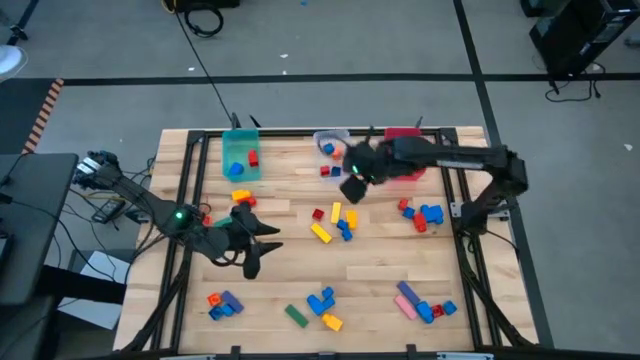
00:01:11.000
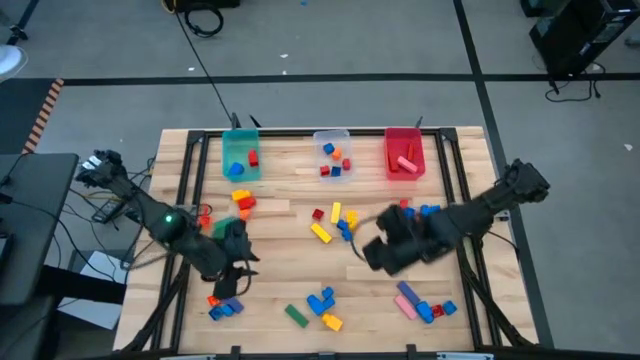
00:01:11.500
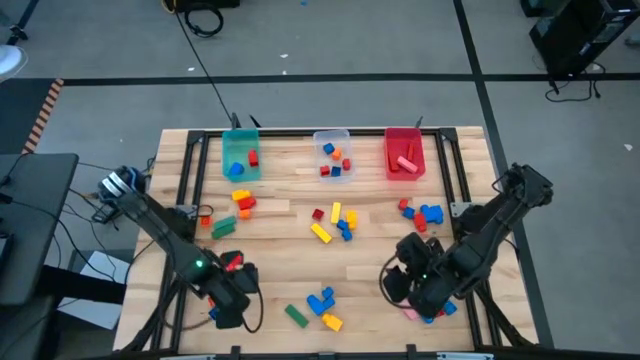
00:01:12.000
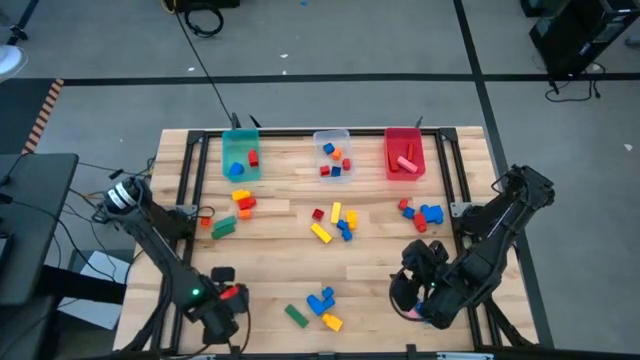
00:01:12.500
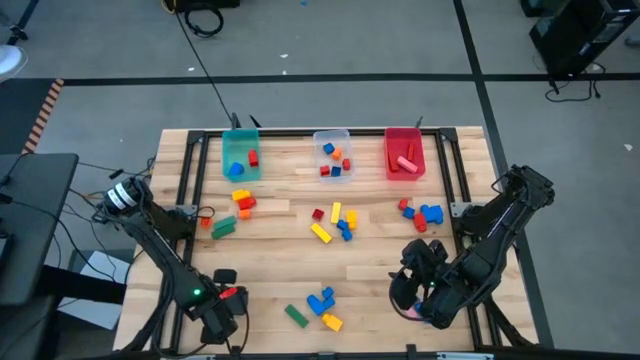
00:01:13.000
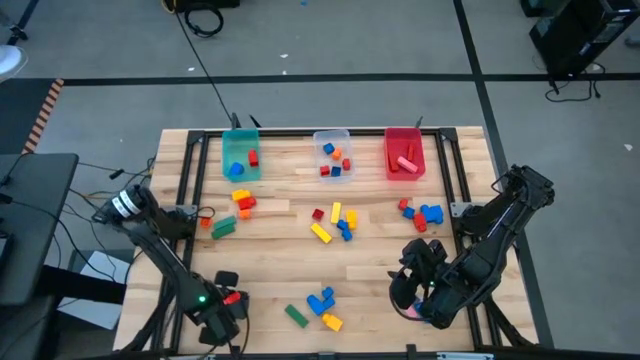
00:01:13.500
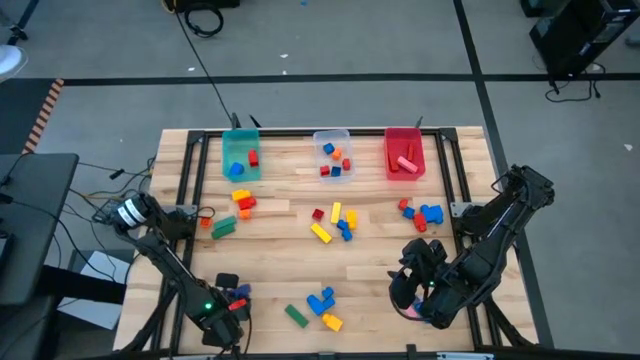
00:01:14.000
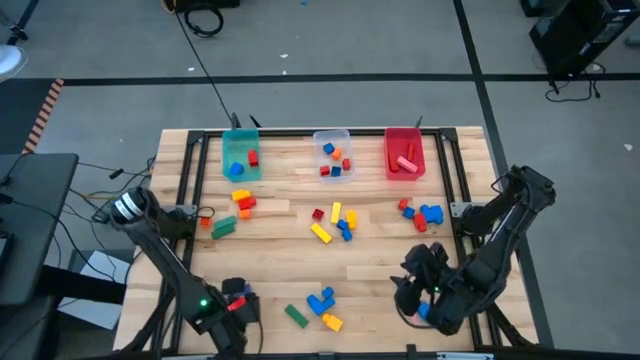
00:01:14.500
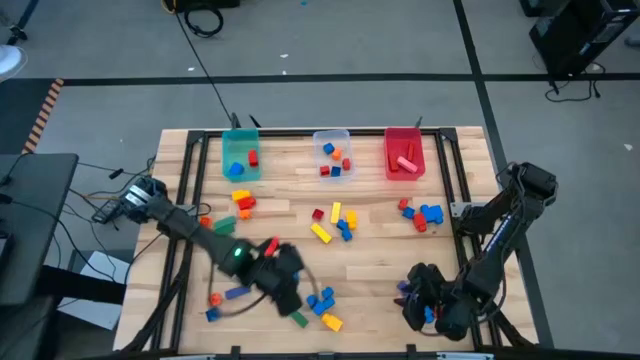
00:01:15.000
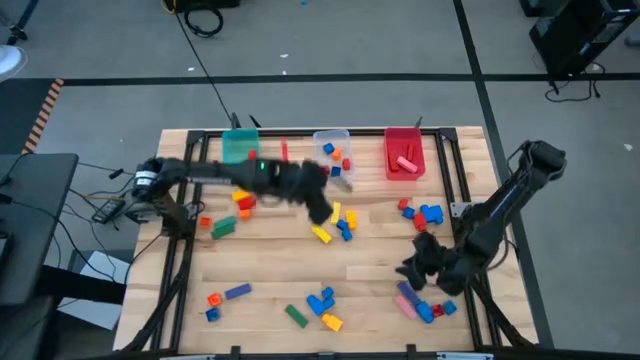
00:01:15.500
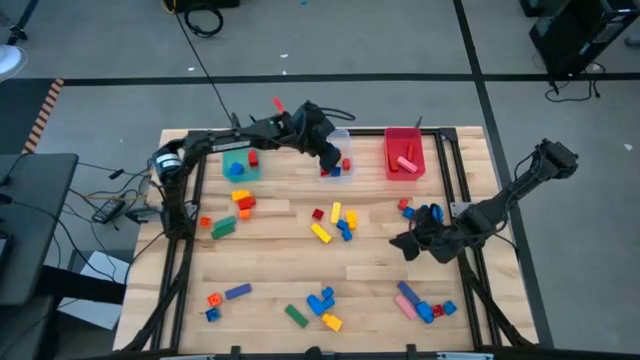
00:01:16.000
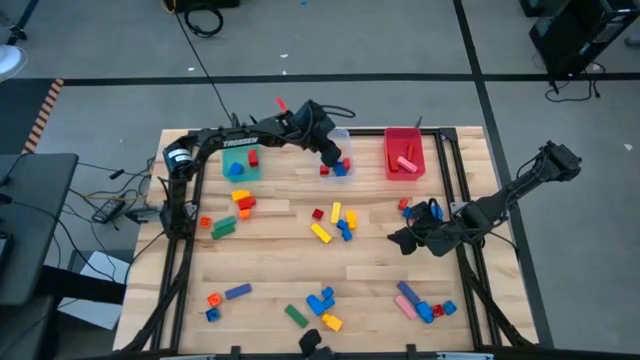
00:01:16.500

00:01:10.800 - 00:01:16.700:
Task: Sort blocks by size
Put the blue 4 stud game piece into the transparent bin

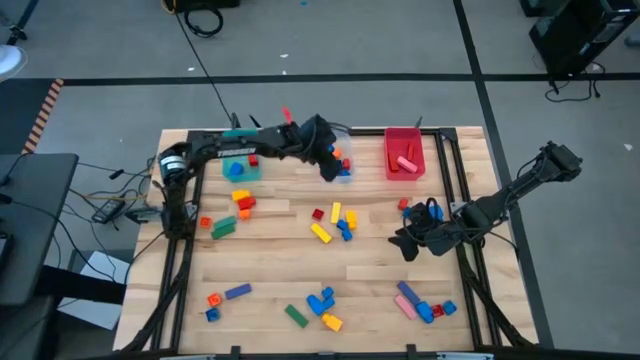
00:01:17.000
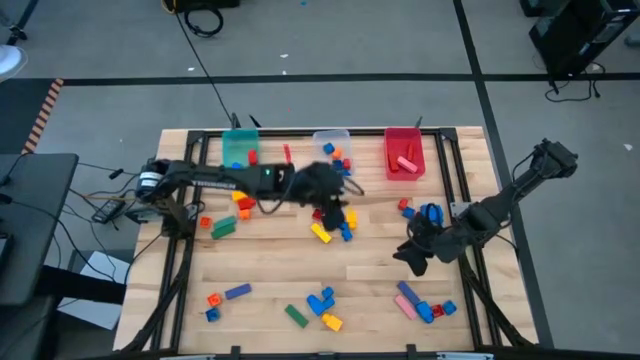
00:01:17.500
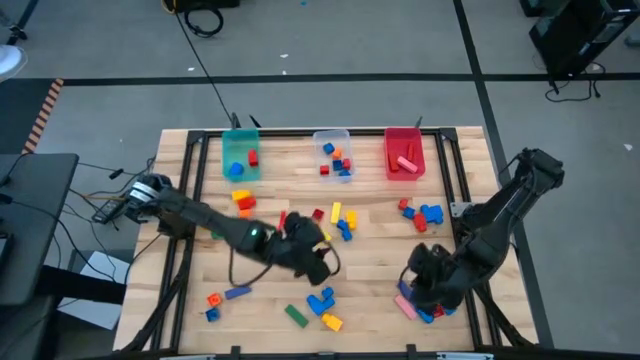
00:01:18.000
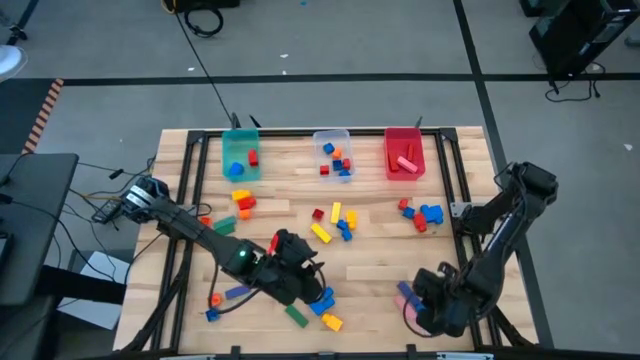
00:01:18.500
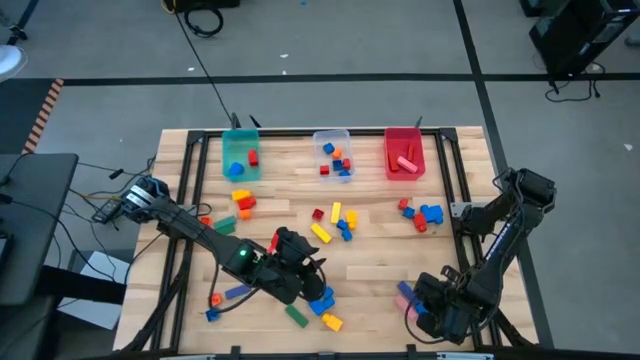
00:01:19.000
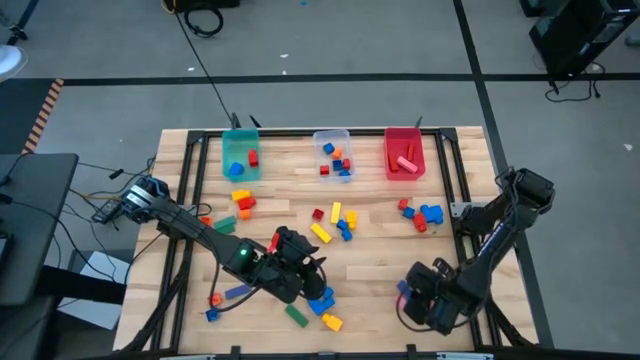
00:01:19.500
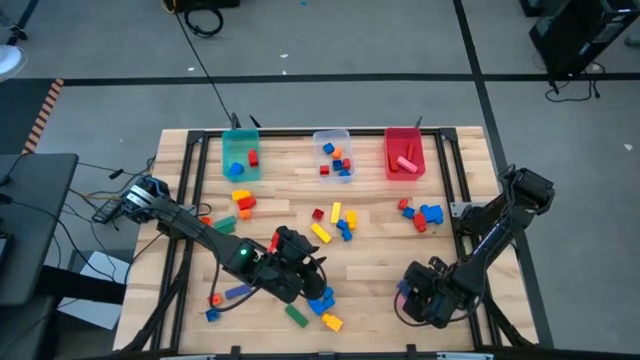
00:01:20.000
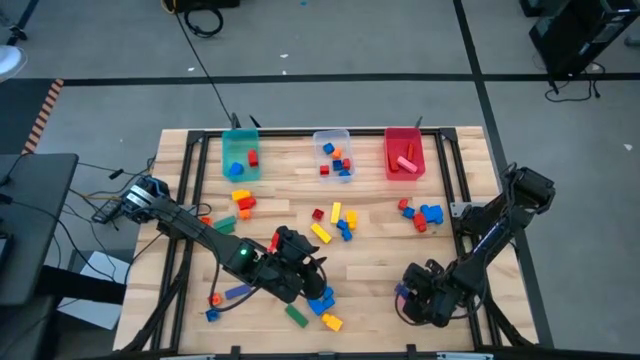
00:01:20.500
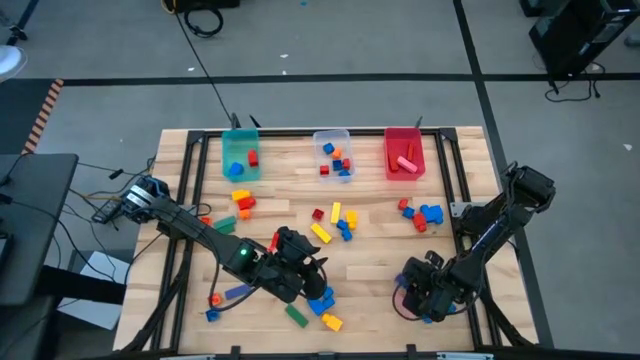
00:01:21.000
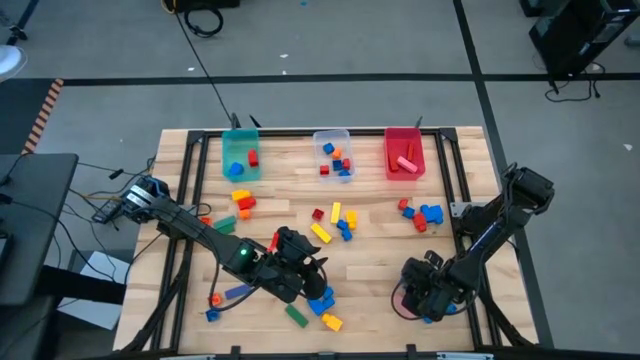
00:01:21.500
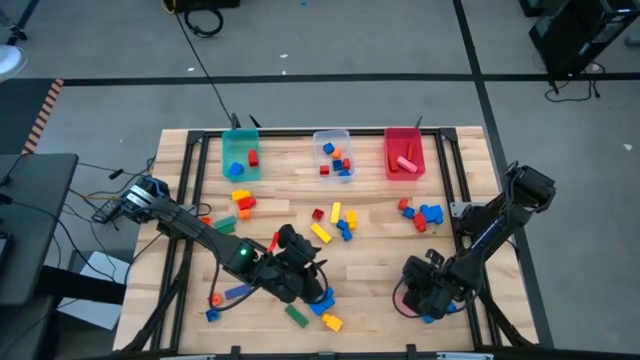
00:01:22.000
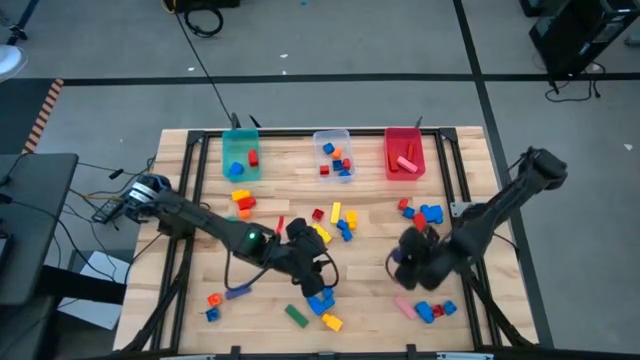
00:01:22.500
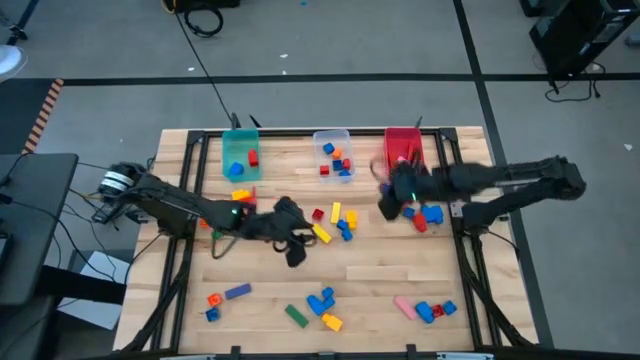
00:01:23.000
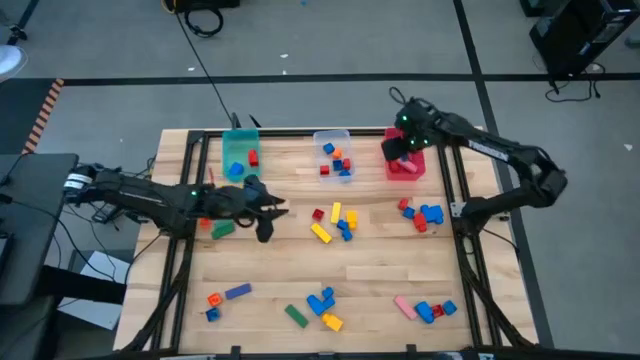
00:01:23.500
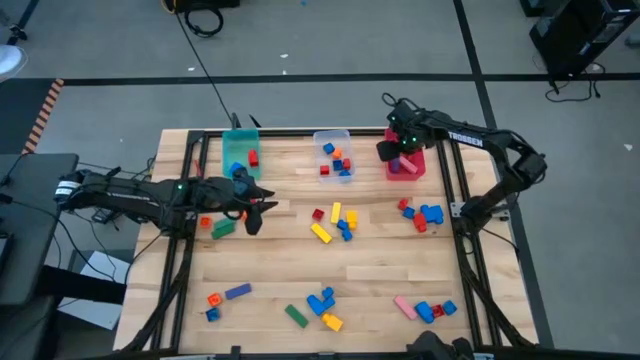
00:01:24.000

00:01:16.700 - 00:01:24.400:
Put the blue block into the red bin

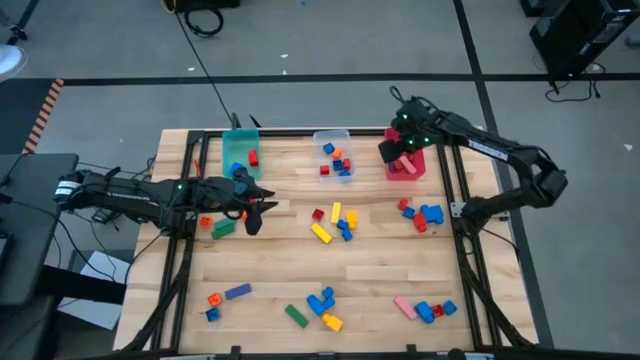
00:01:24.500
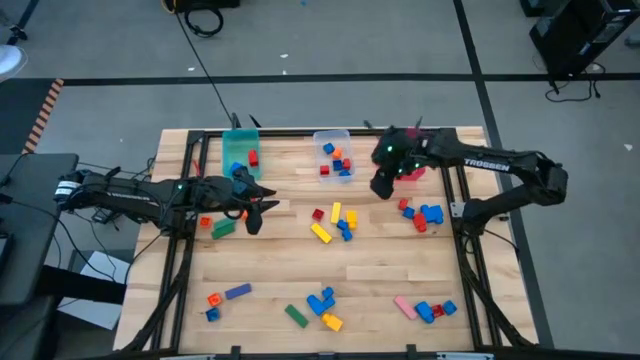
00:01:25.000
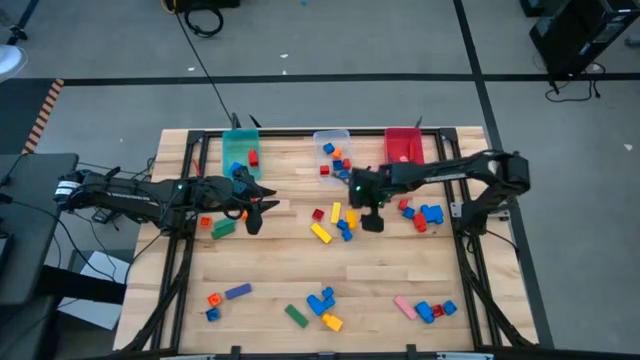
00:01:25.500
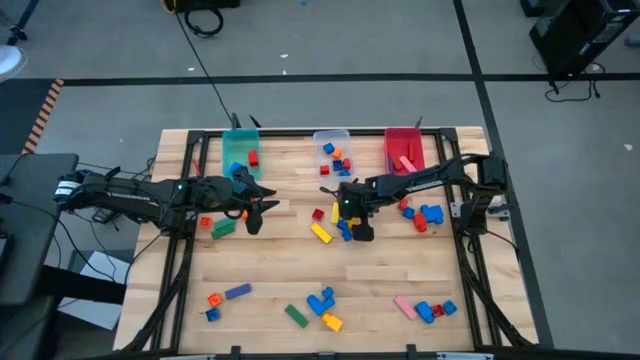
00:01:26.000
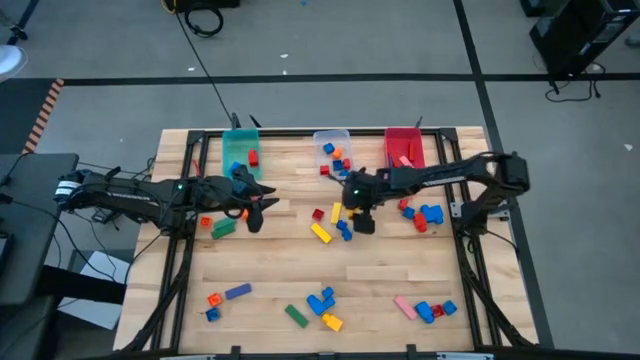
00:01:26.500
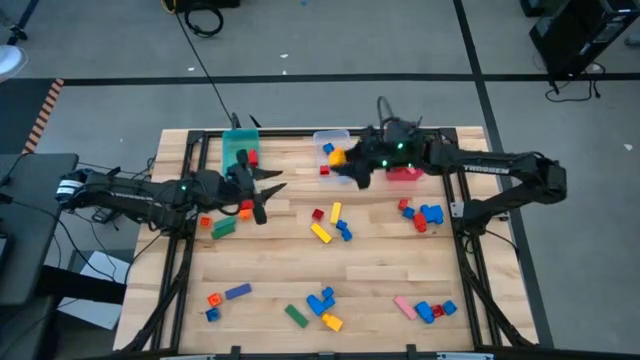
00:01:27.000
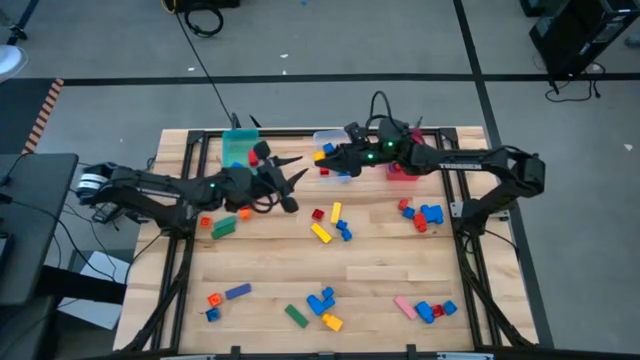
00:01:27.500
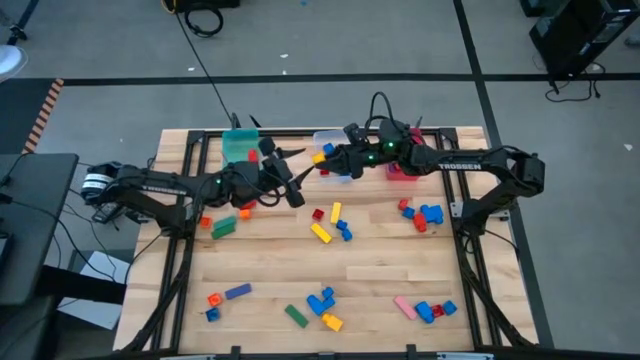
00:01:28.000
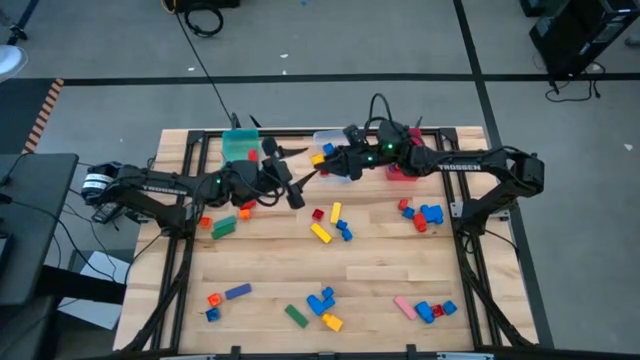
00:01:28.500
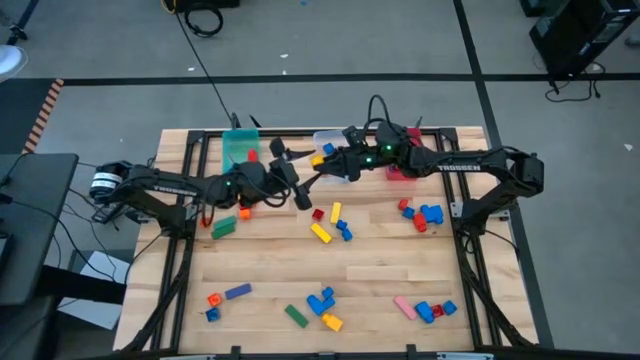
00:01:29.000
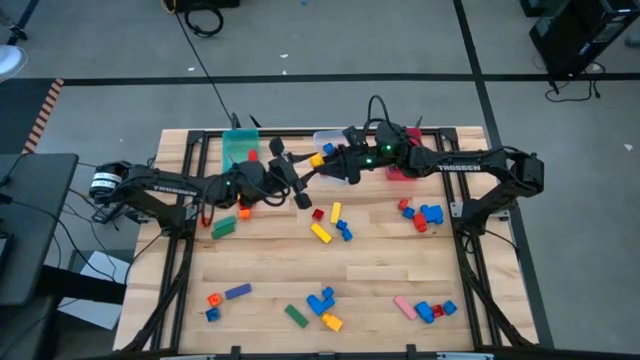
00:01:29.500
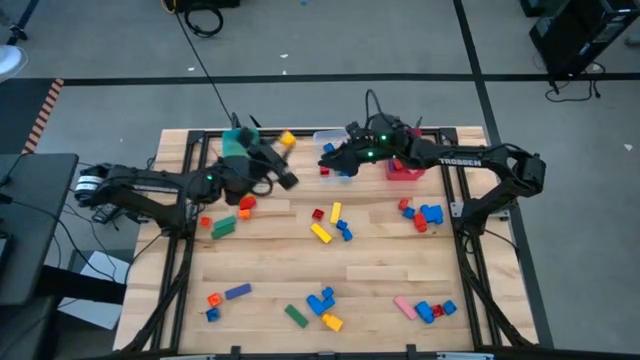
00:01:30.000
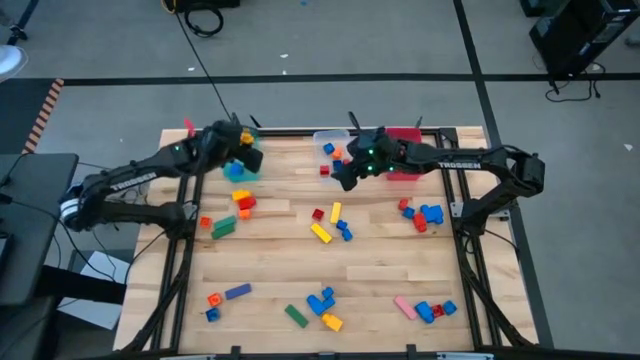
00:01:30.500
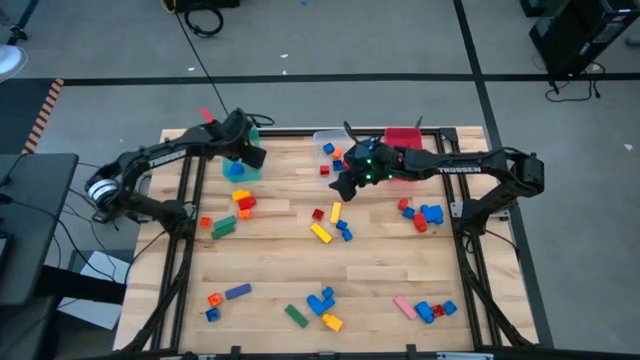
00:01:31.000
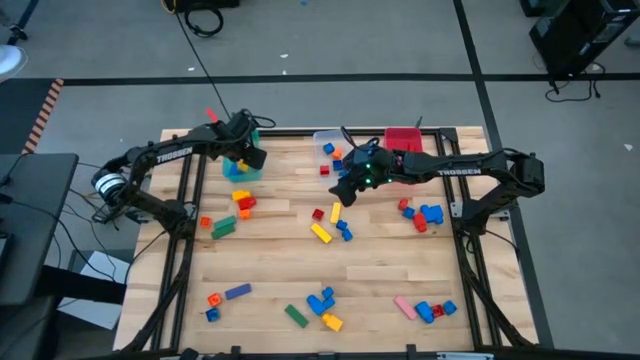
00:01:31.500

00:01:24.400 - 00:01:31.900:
Put the yellow one-stud game piece into the blue bin
